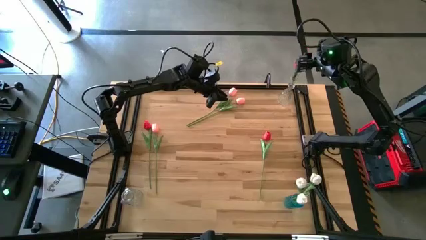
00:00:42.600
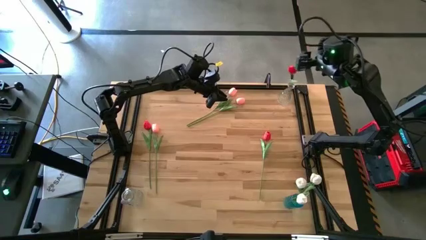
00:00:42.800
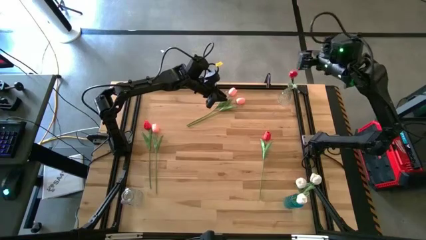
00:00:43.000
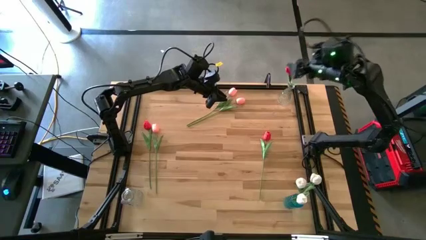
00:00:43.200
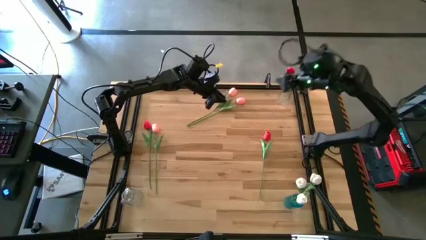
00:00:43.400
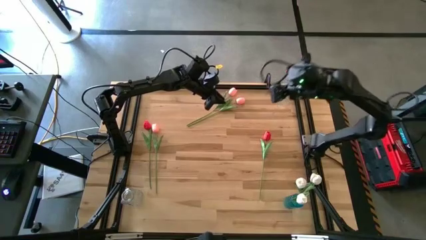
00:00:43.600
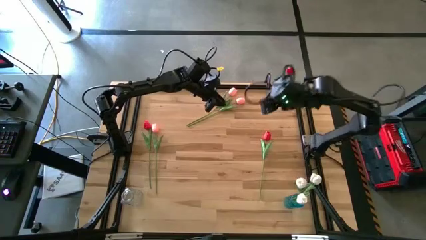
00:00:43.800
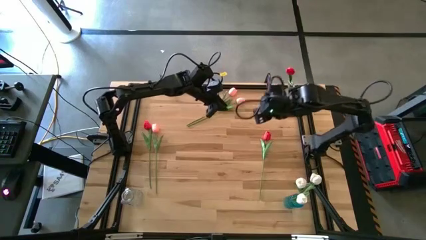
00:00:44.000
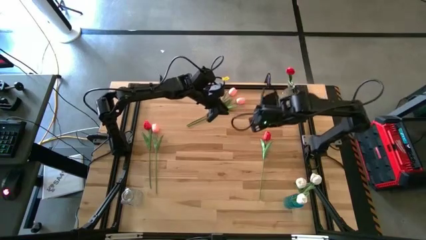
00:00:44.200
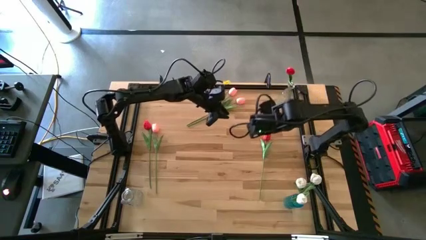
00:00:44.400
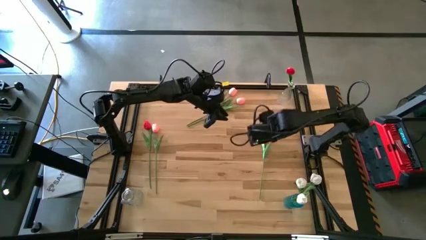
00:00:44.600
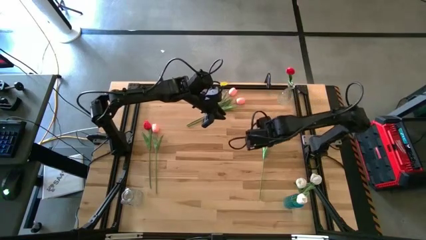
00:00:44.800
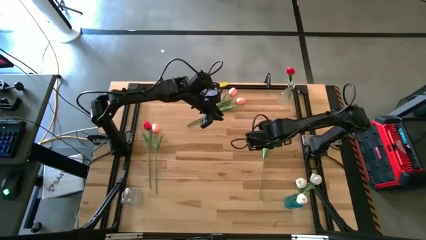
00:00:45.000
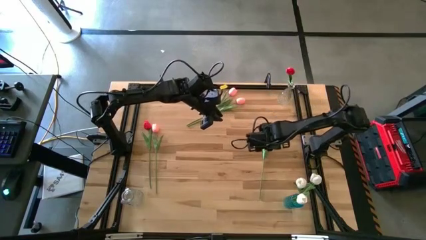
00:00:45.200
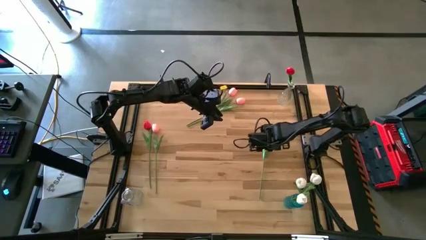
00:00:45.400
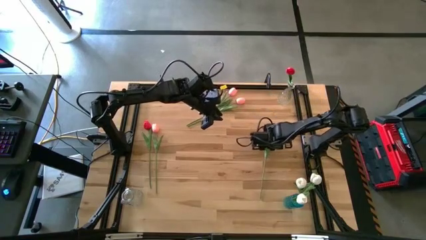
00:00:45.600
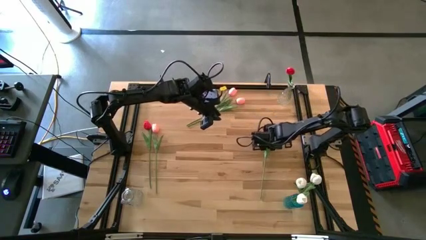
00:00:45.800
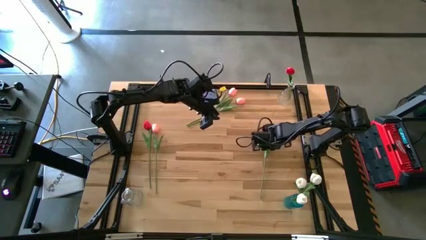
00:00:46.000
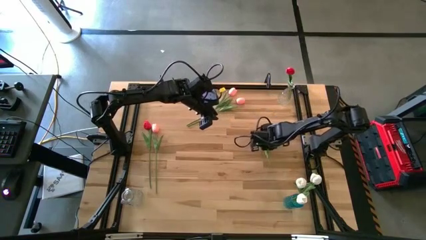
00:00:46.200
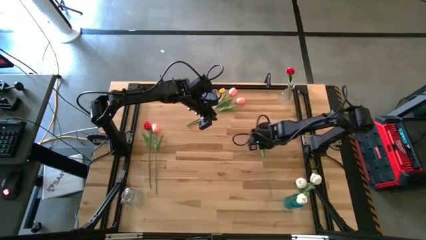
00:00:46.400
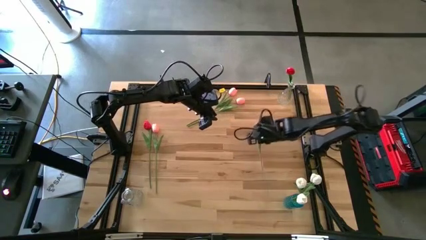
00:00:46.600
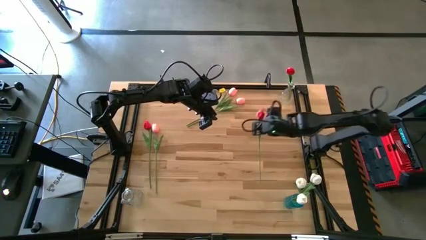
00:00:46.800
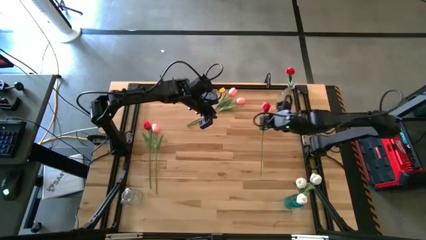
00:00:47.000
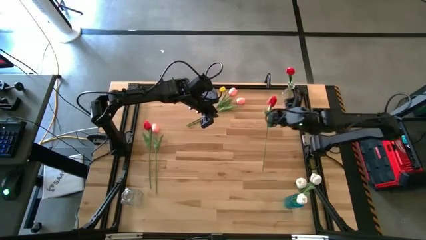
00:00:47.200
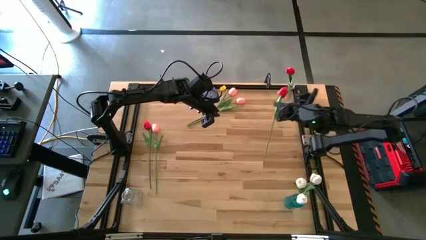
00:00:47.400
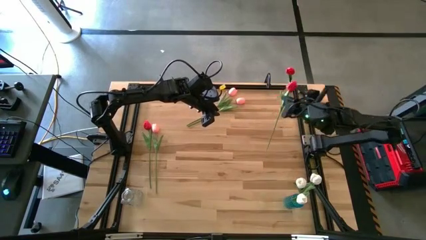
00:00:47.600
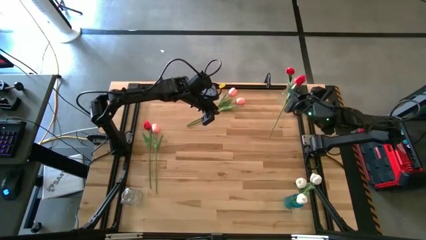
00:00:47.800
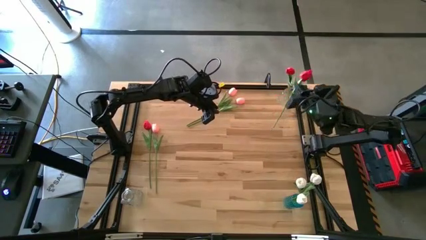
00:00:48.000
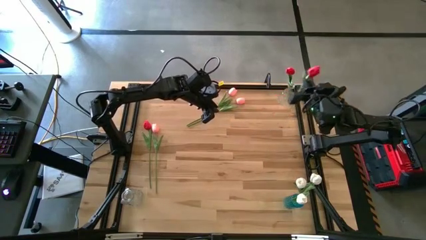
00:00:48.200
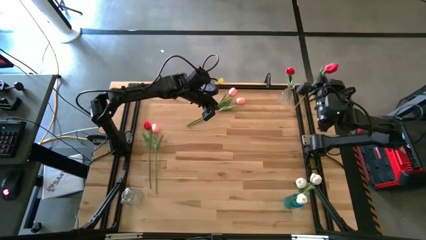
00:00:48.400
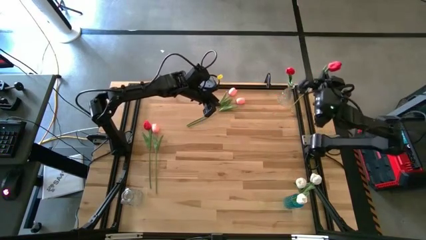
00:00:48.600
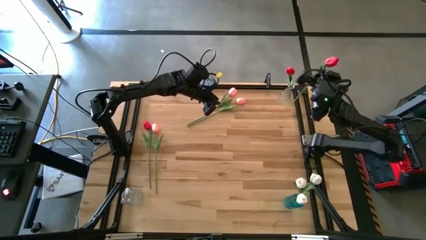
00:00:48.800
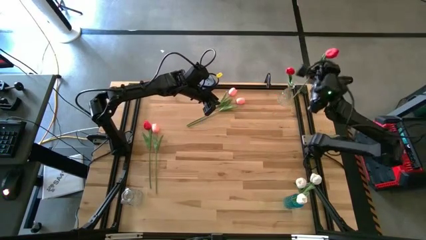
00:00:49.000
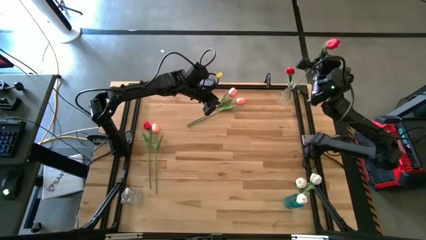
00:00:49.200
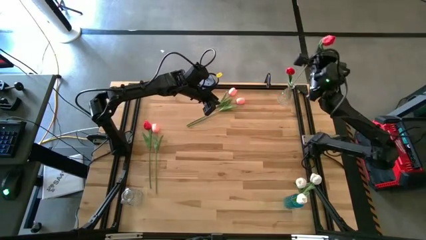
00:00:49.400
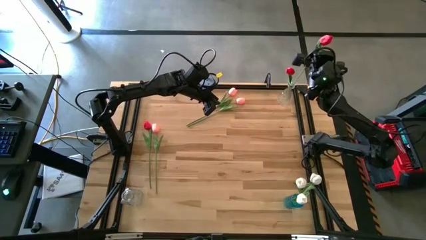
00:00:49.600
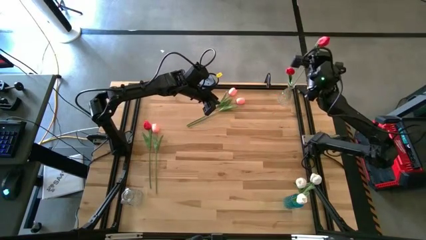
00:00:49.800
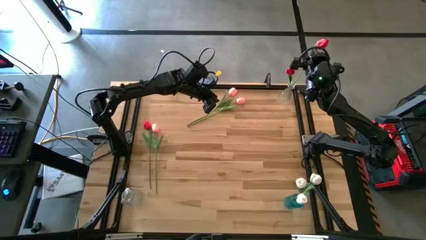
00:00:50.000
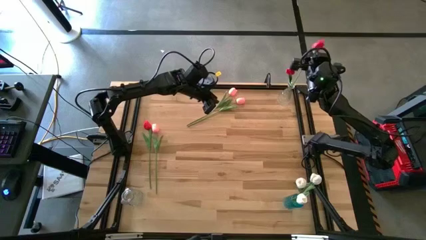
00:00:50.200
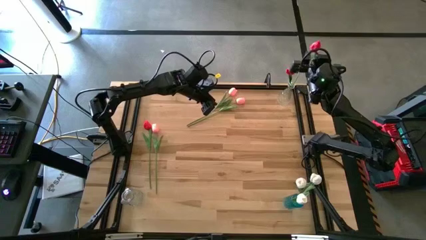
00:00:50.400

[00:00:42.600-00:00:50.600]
Task: Sort flowers into vase by color
Put the right red flower into the top transparent vase

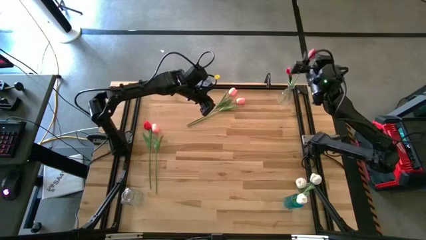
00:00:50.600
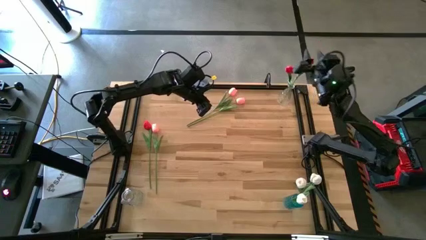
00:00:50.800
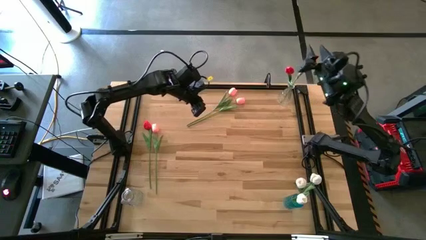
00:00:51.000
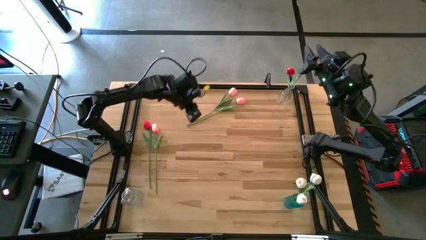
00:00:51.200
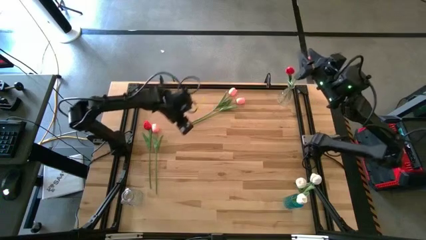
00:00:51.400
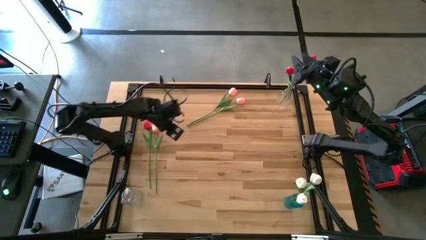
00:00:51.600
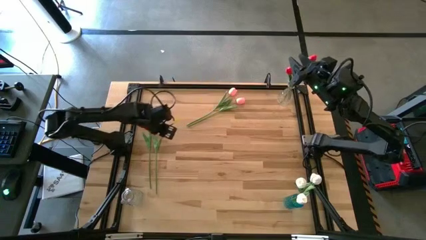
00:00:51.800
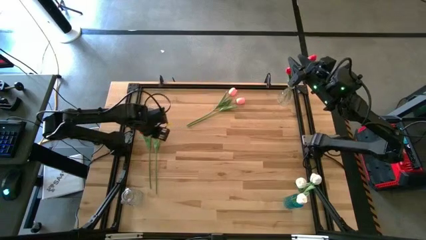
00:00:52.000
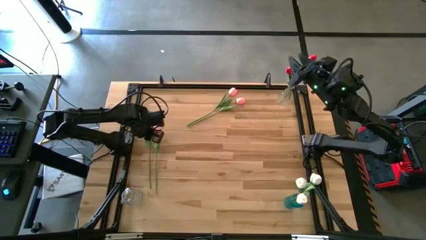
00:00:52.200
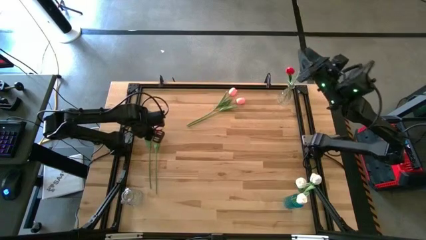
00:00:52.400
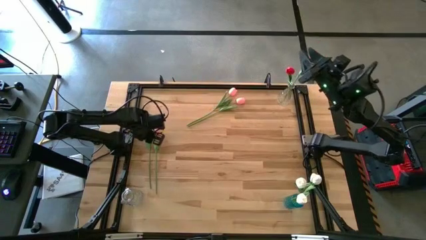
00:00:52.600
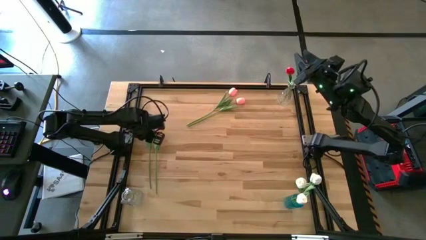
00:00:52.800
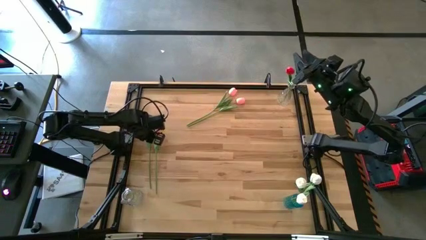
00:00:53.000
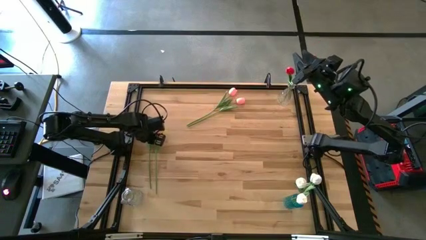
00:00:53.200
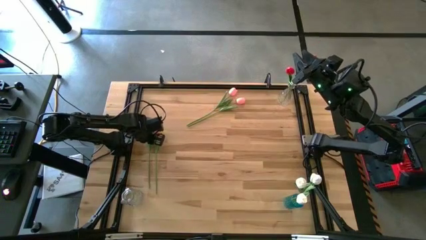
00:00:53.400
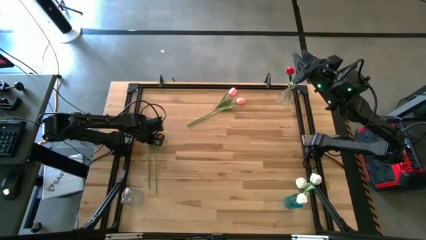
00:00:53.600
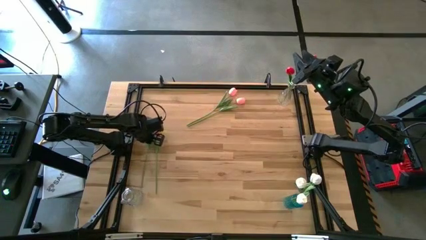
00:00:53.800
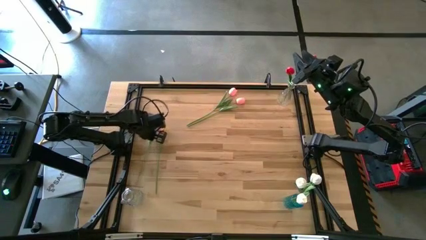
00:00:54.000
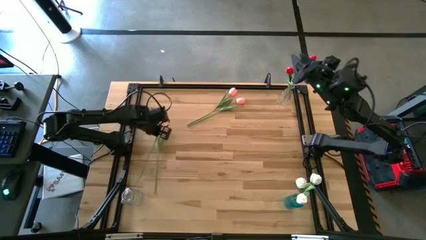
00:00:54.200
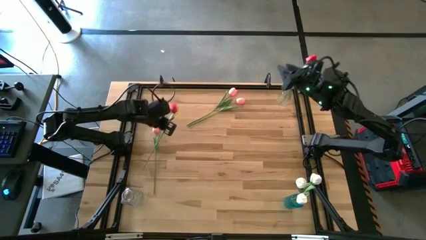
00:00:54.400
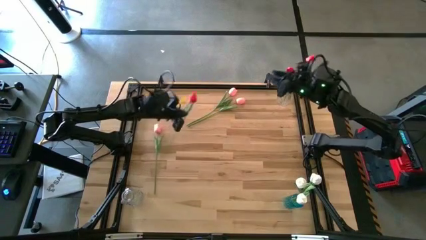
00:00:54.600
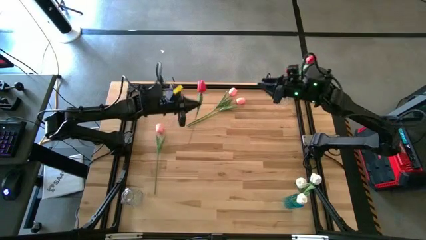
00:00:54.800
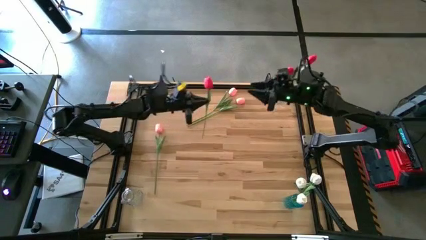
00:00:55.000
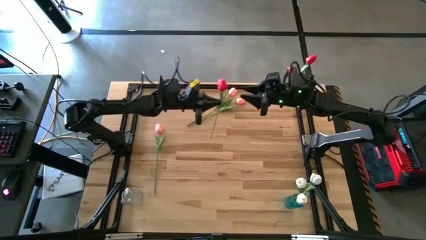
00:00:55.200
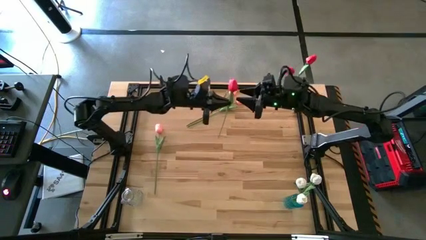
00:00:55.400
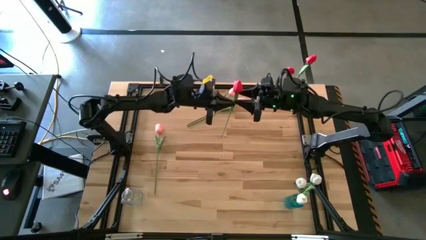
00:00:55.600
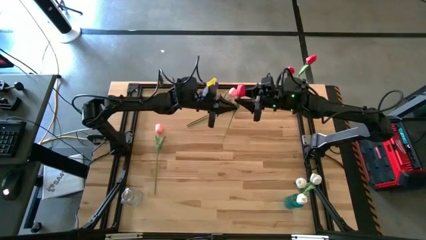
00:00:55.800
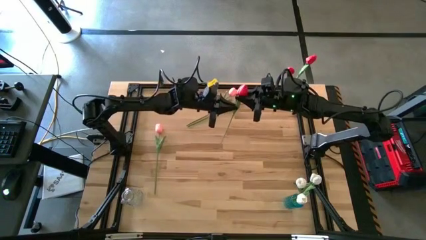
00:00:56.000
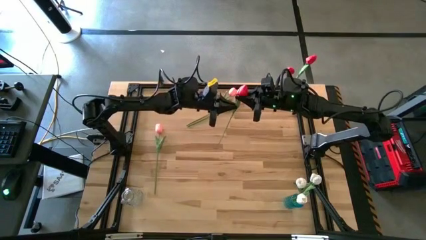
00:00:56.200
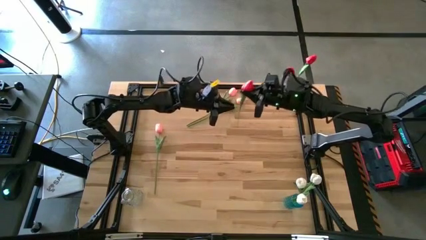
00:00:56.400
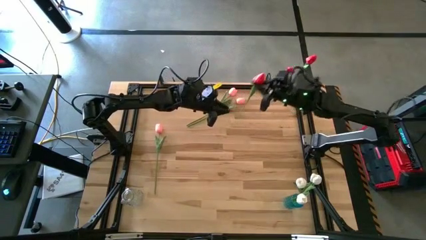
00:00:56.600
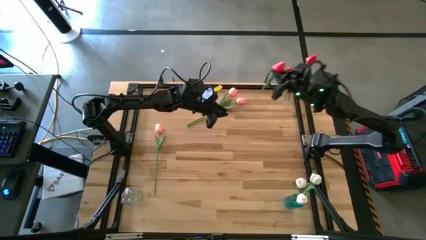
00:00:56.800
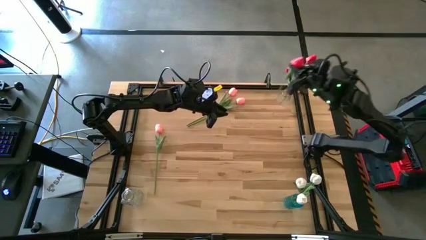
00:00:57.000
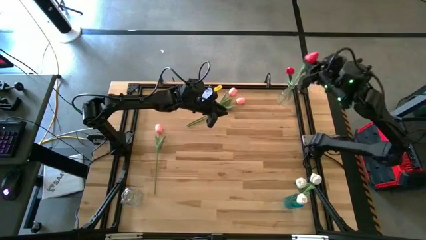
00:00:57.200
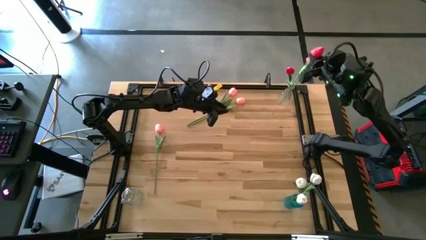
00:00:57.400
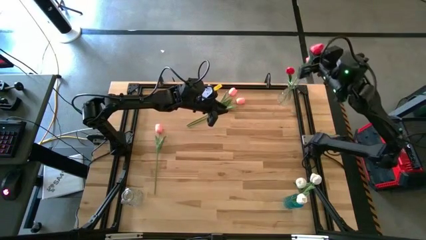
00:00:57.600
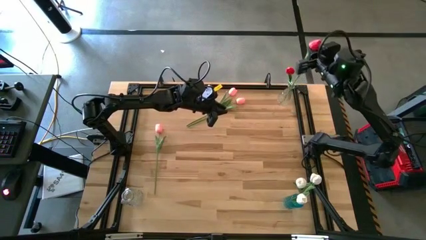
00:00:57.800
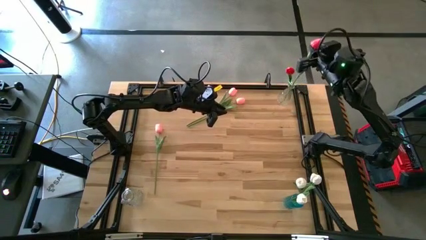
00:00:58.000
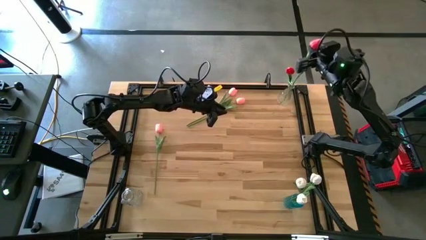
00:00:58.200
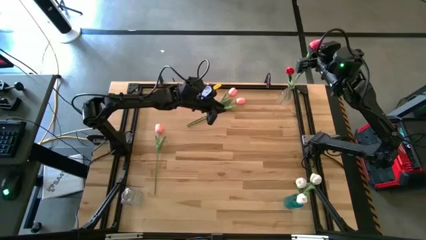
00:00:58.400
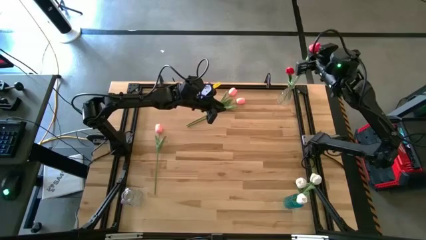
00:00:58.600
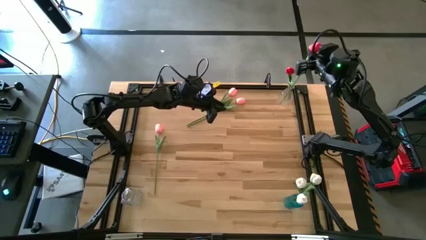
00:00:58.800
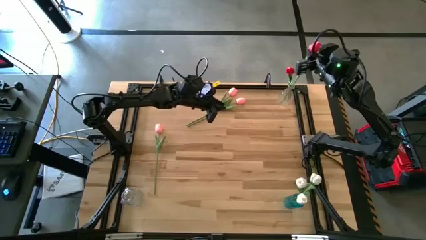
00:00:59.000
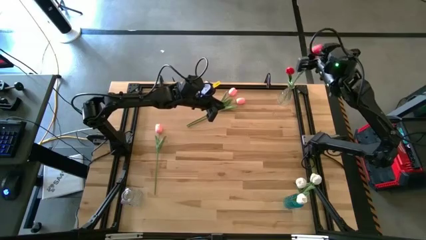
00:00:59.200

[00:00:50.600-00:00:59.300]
Put the red flower into the top transparent vase
